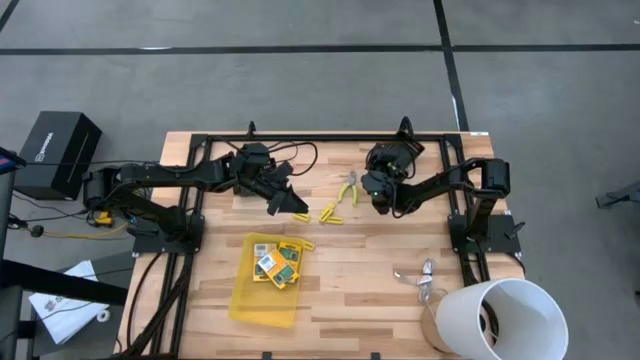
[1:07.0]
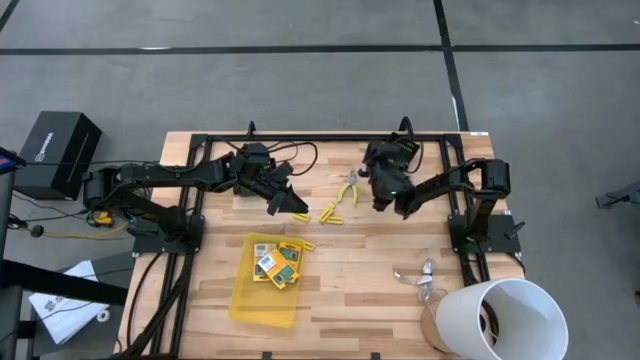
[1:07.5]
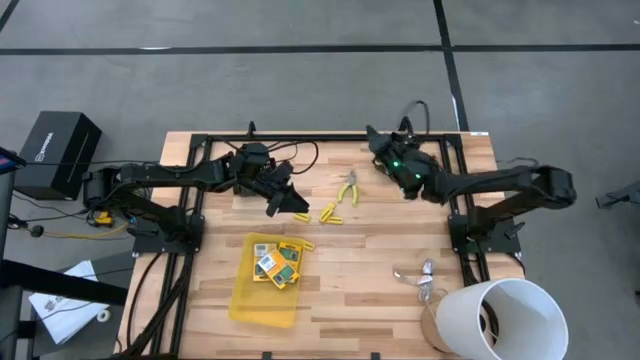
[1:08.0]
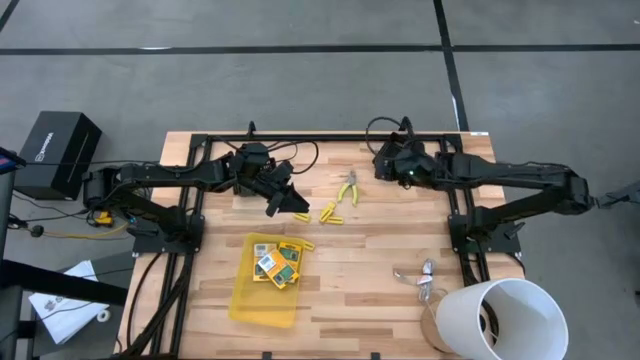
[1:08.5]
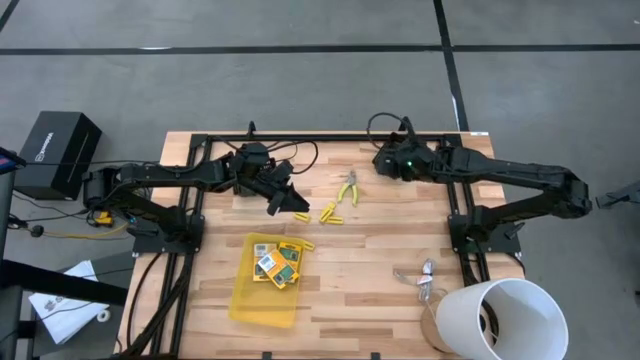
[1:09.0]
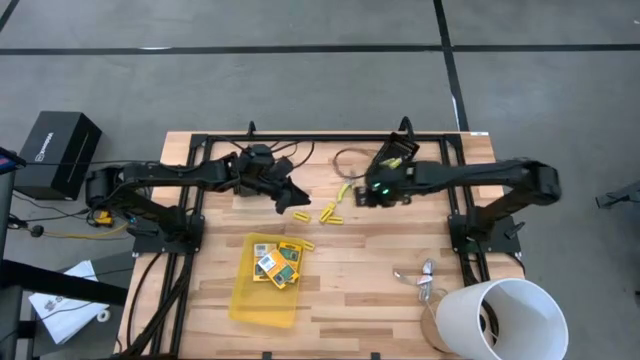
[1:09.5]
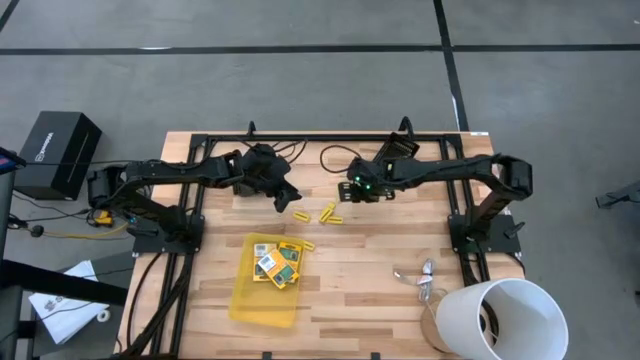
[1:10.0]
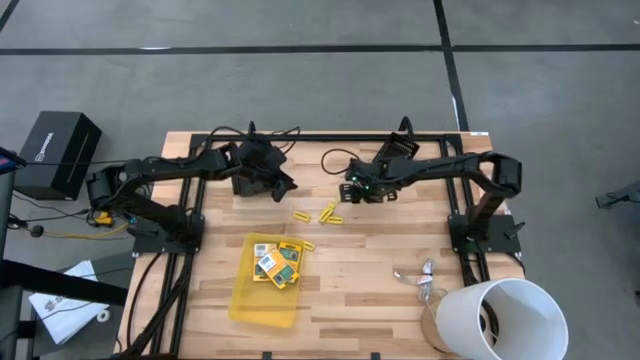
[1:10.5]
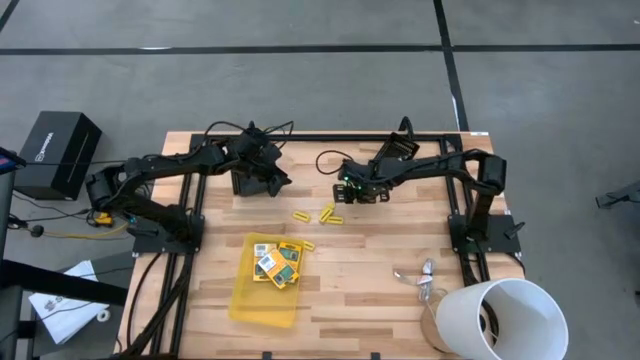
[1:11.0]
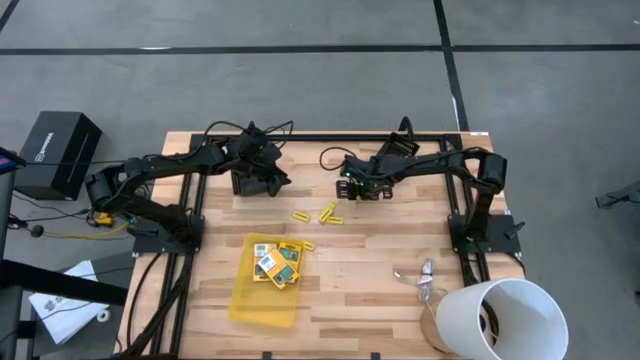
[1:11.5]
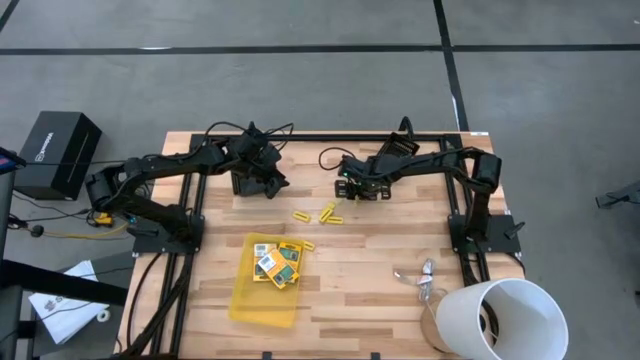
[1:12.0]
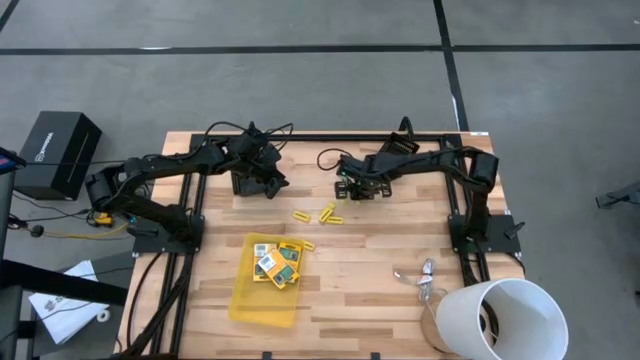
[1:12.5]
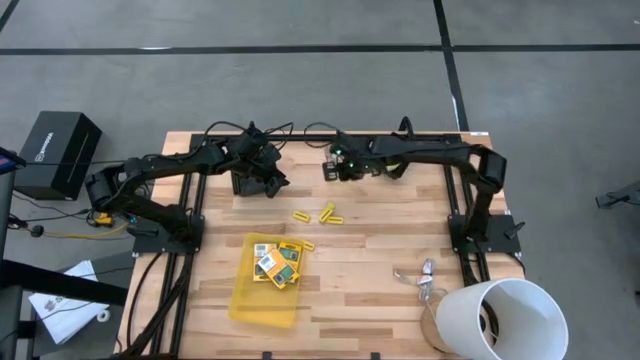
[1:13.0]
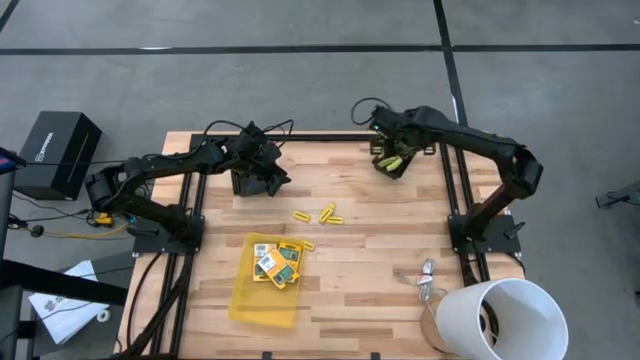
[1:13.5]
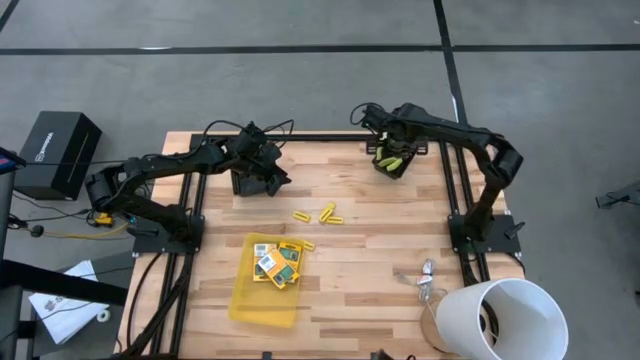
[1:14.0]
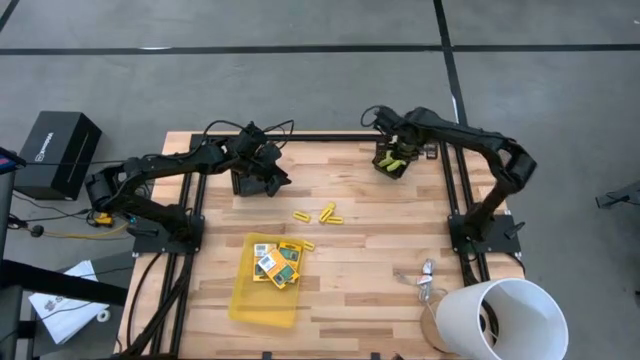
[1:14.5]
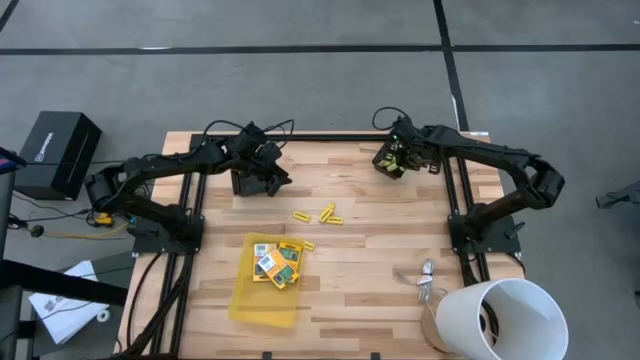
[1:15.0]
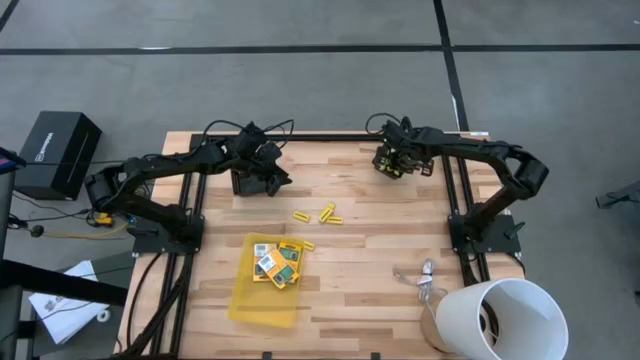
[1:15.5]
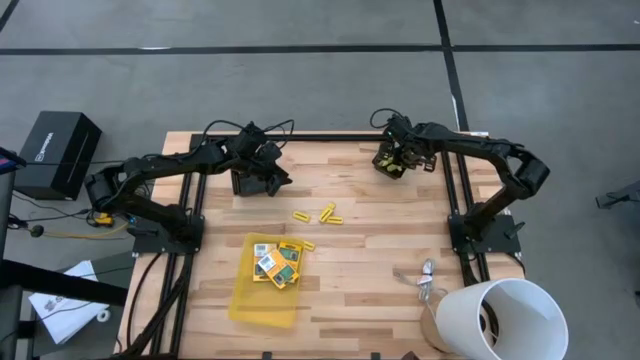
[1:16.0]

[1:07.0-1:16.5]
Task: Pick & Place School Supplies
Put the green puncher into the right black bin

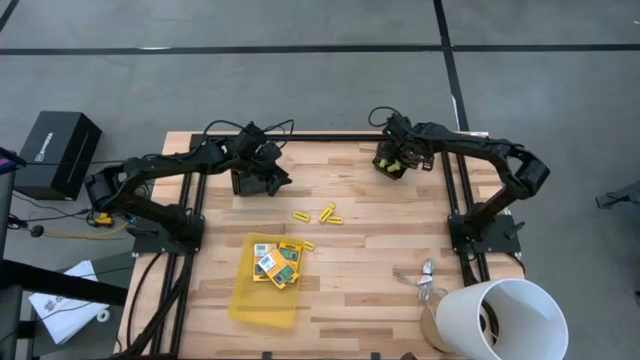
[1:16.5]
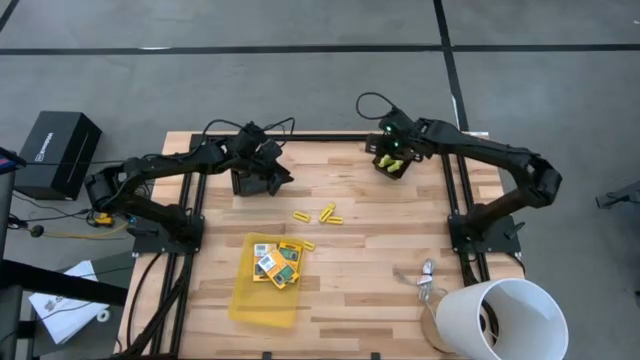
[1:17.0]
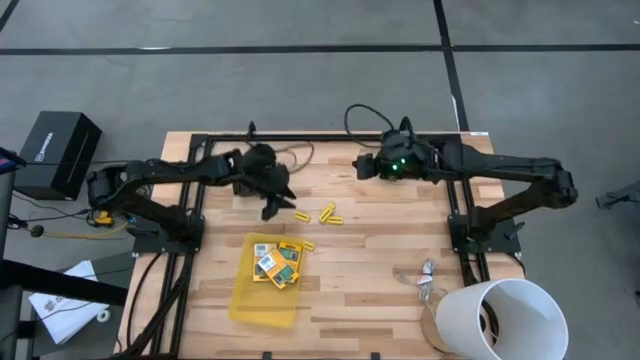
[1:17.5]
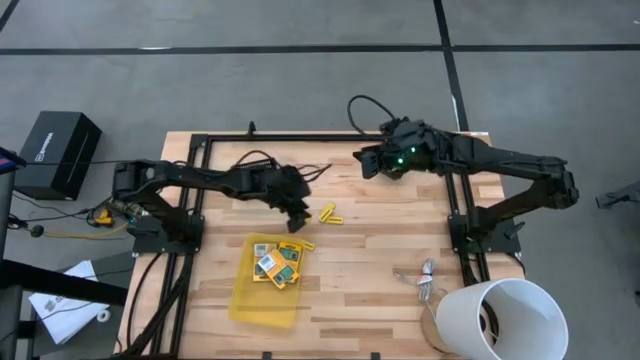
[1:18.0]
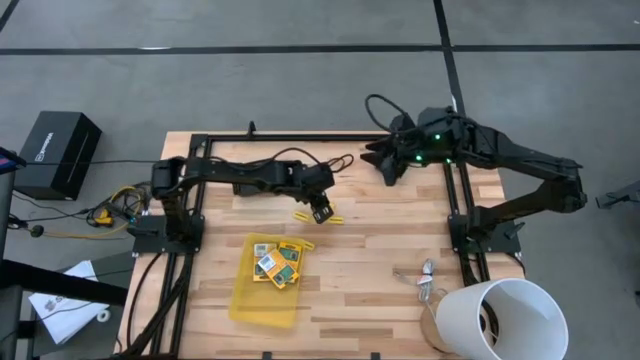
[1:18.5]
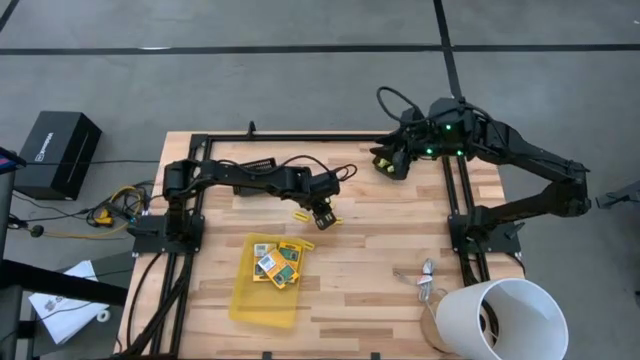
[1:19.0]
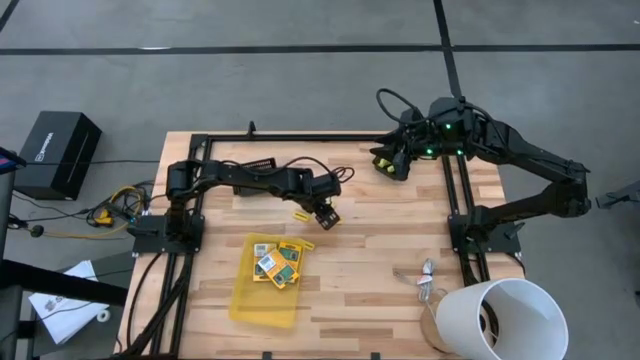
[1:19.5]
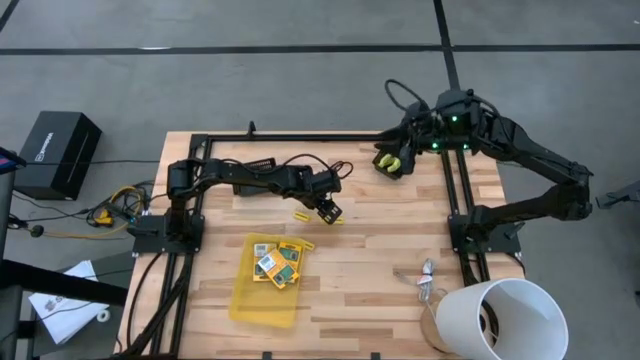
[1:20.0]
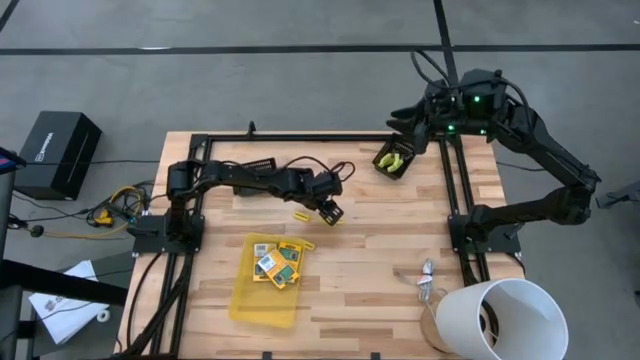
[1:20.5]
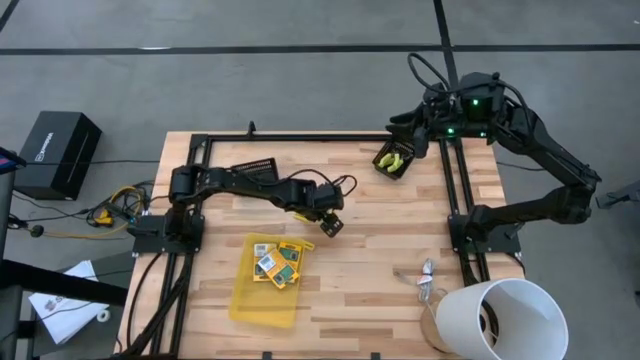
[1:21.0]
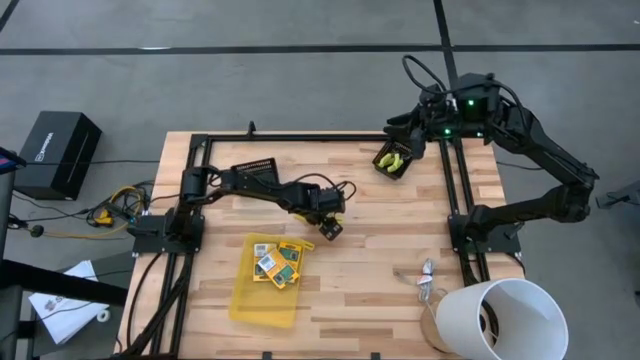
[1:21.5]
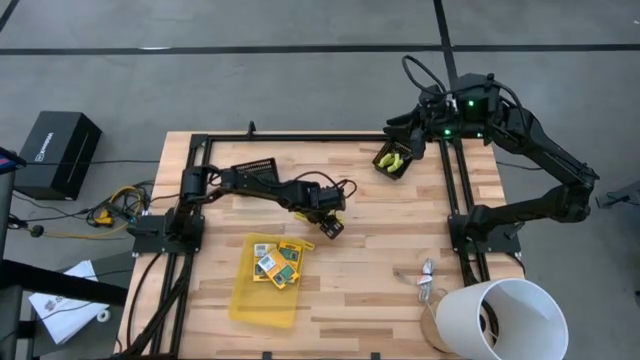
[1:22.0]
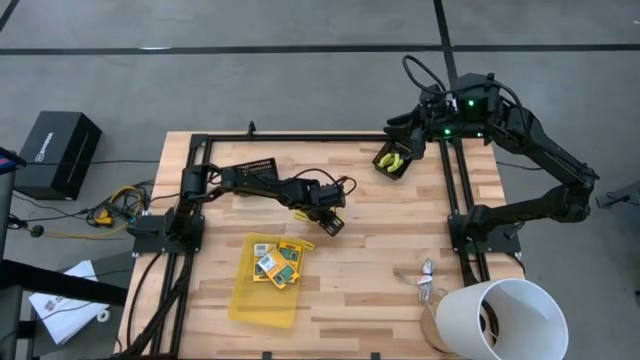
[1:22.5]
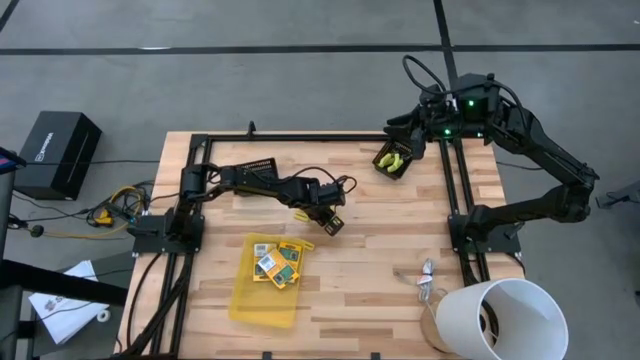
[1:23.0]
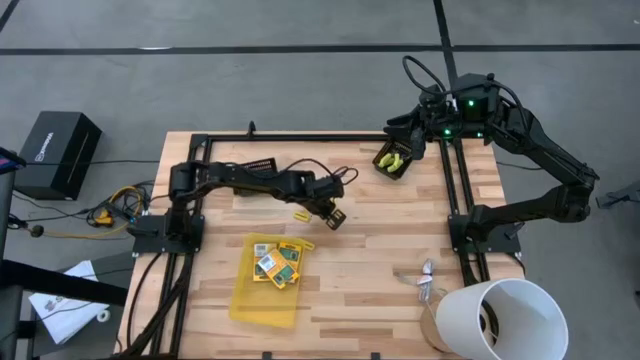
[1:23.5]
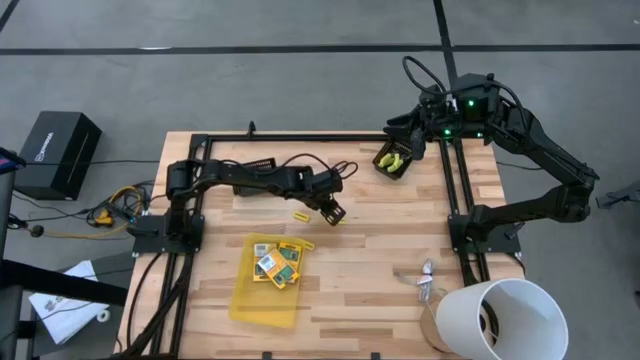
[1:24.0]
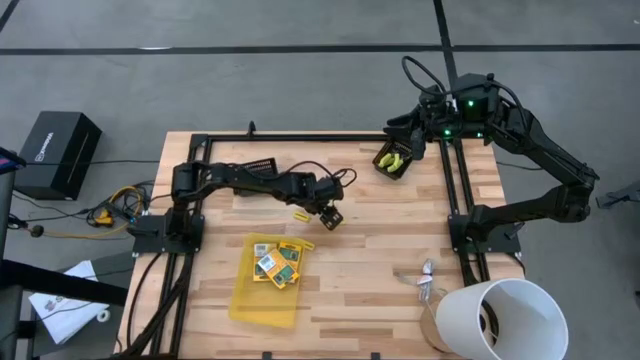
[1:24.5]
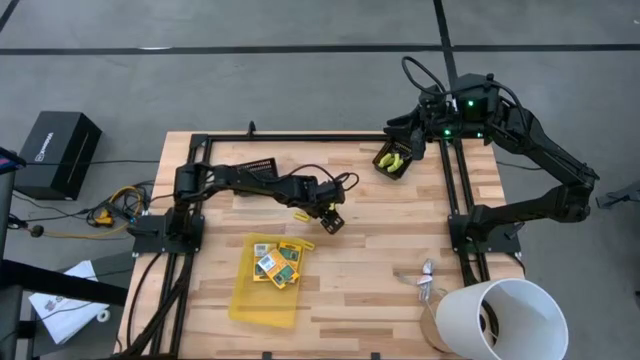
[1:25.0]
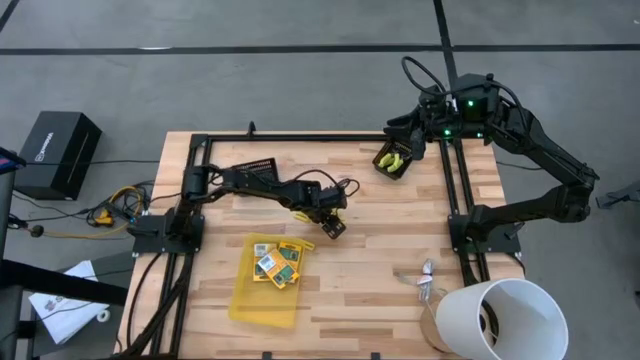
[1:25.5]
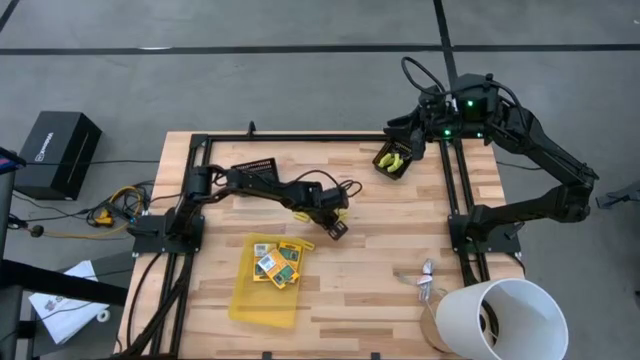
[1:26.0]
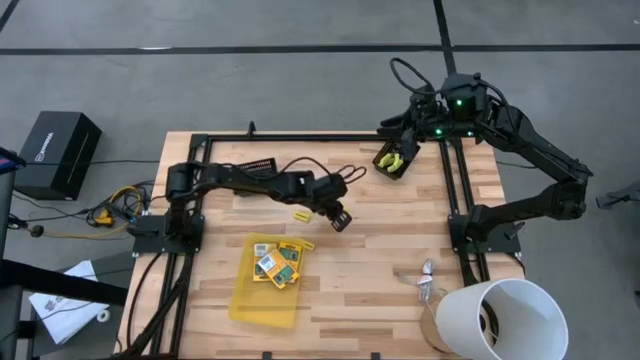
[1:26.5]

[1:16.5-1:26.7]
Put the yellow eraser into the left black bin

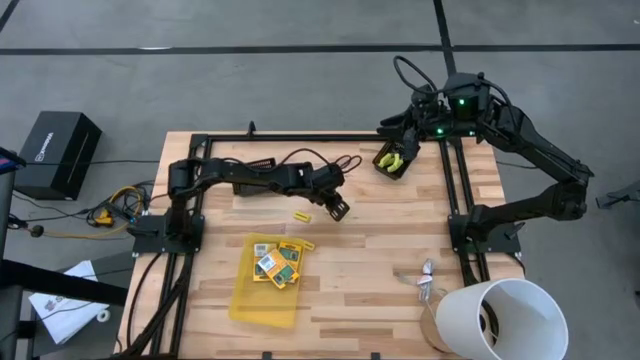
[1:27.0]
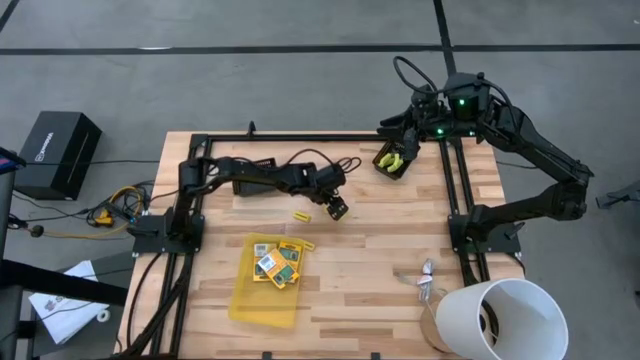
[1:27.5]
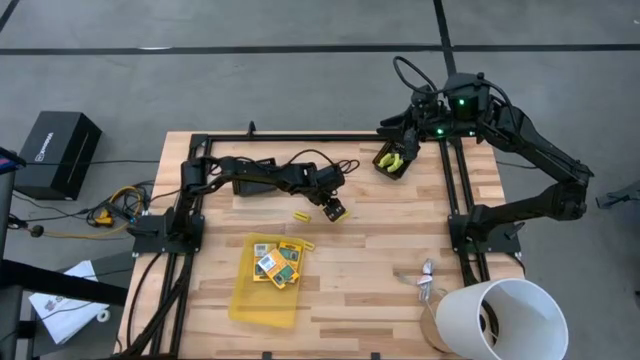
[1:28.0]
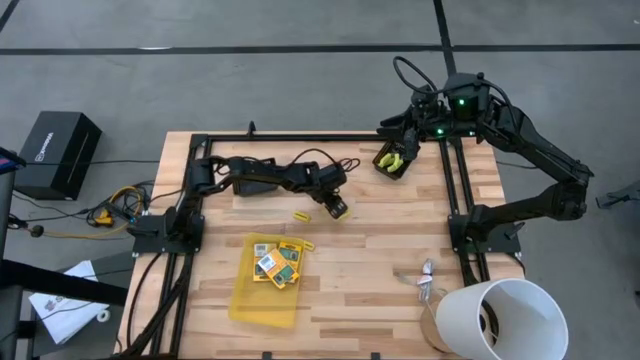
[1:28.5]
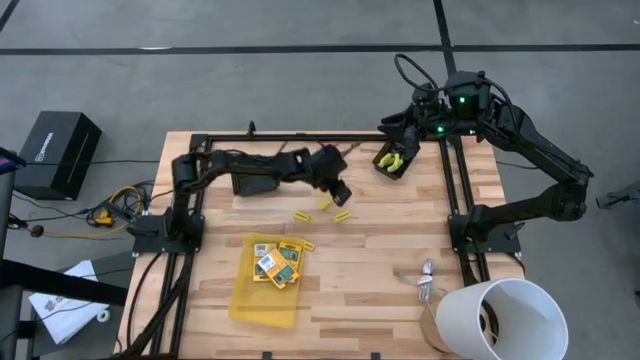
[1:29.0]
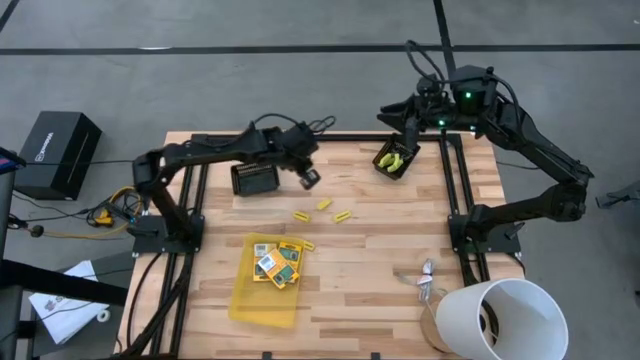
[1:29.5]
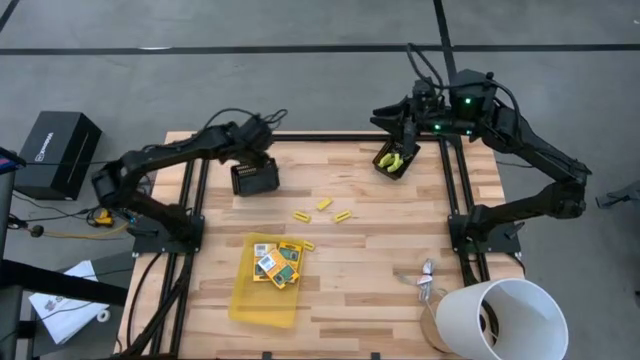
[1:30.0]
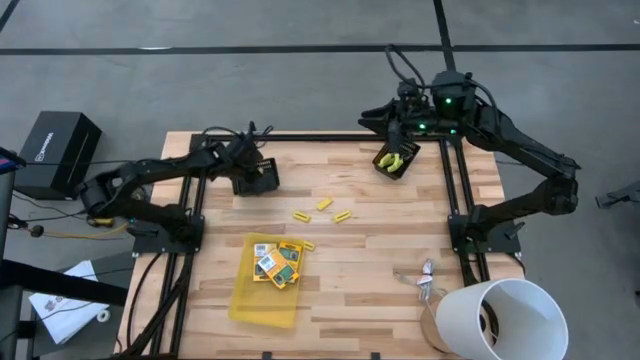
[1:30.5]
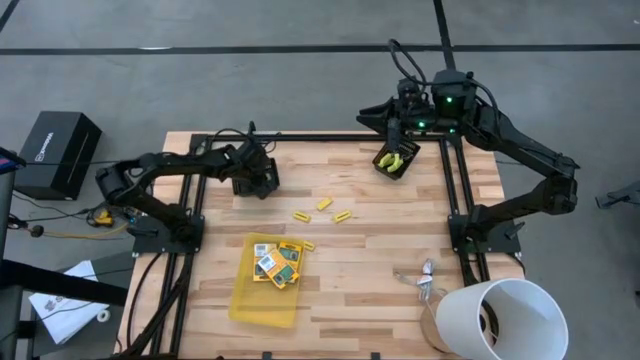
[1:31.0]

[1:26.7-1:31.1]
Put the yellow eraser into the left black bin
